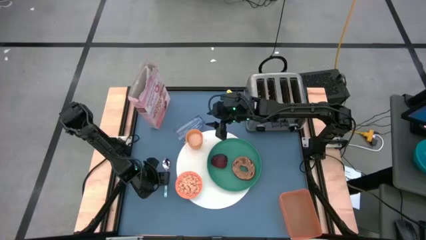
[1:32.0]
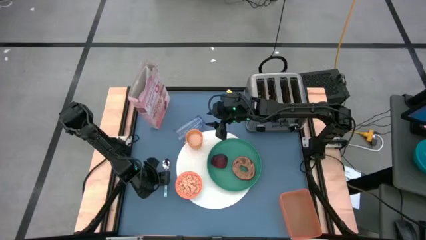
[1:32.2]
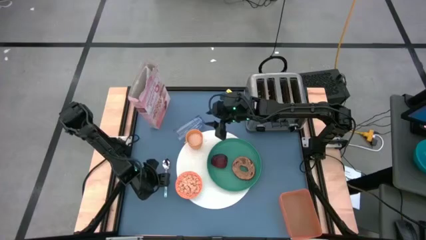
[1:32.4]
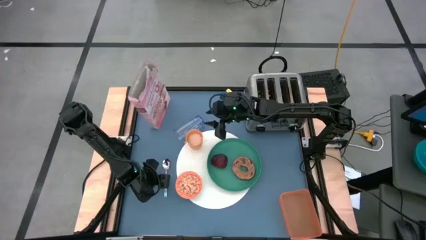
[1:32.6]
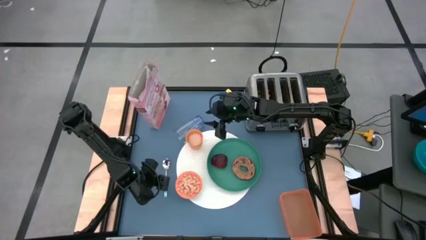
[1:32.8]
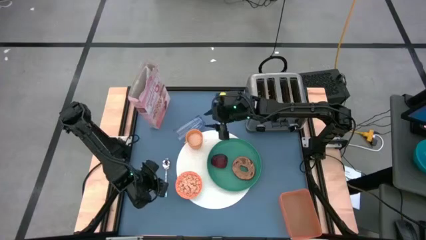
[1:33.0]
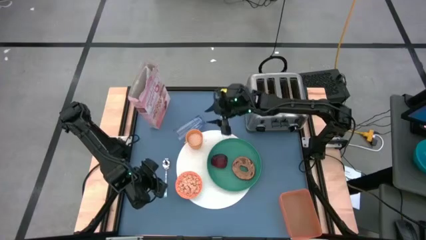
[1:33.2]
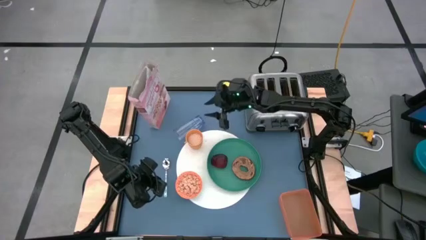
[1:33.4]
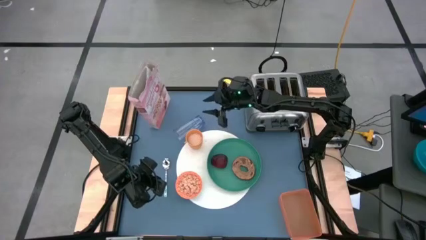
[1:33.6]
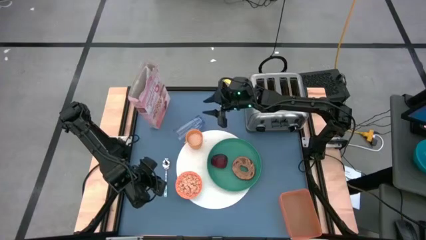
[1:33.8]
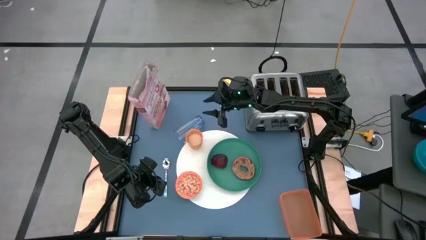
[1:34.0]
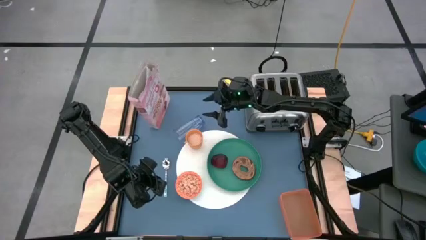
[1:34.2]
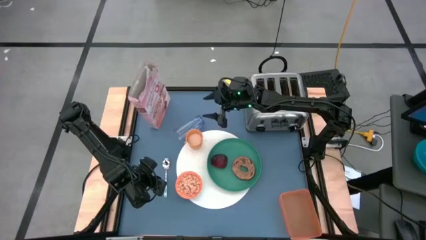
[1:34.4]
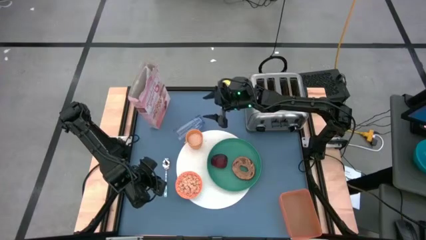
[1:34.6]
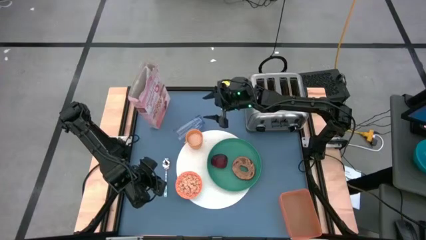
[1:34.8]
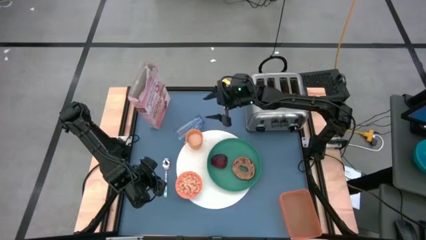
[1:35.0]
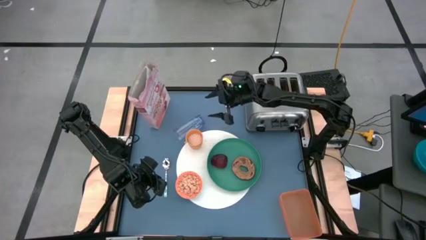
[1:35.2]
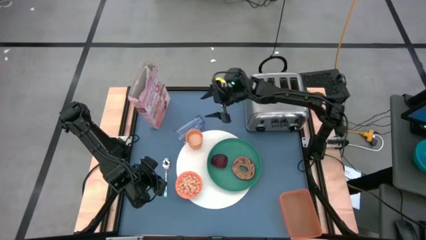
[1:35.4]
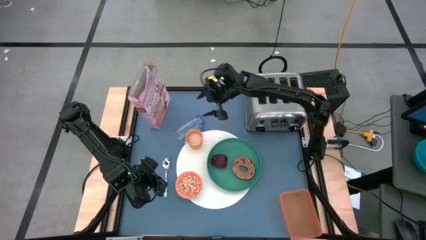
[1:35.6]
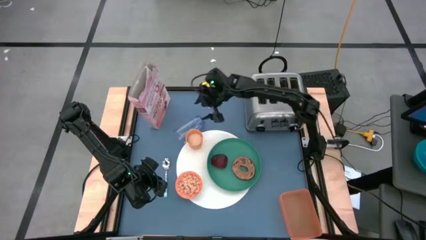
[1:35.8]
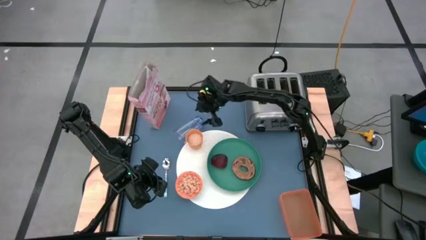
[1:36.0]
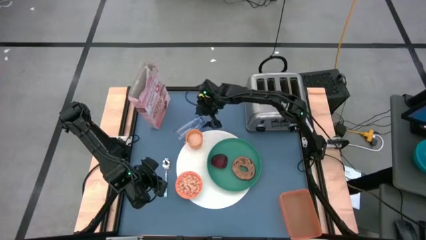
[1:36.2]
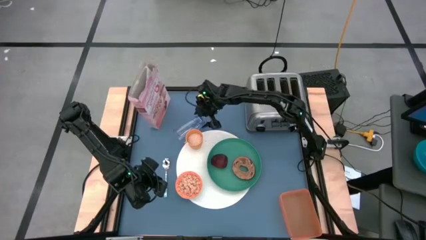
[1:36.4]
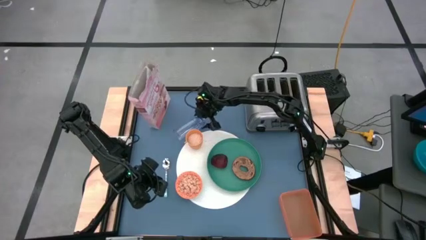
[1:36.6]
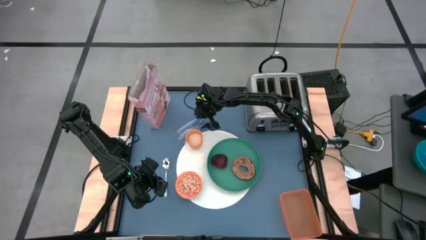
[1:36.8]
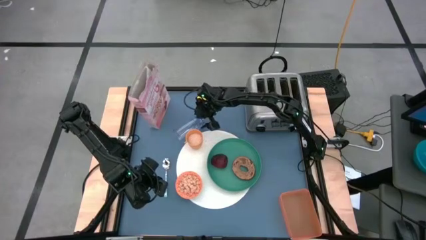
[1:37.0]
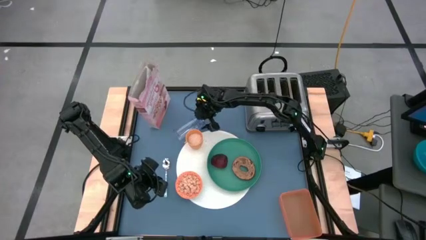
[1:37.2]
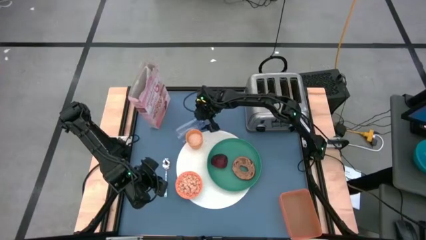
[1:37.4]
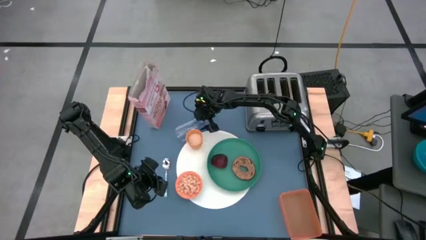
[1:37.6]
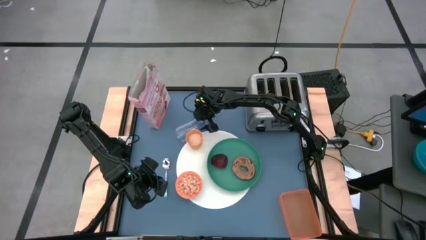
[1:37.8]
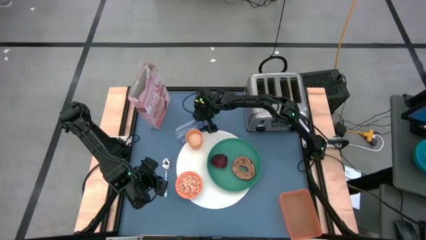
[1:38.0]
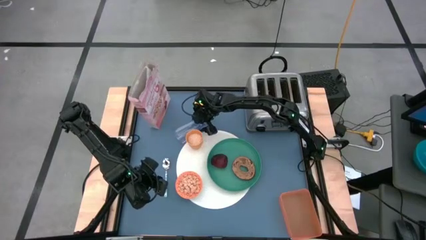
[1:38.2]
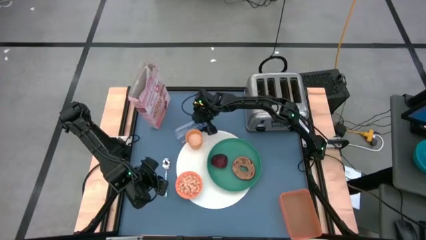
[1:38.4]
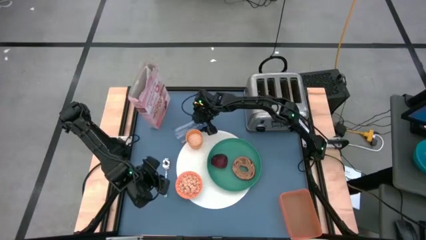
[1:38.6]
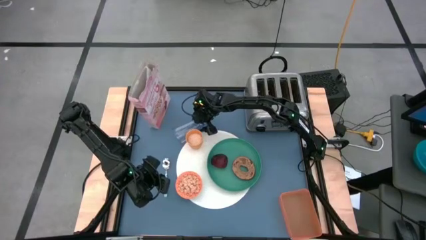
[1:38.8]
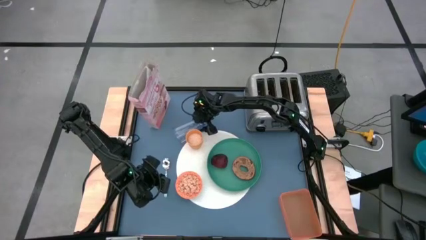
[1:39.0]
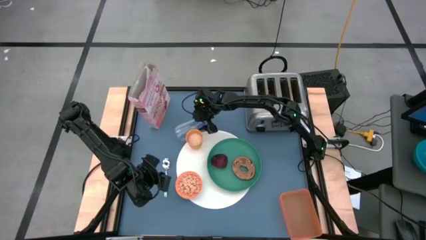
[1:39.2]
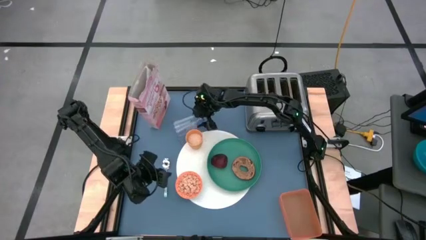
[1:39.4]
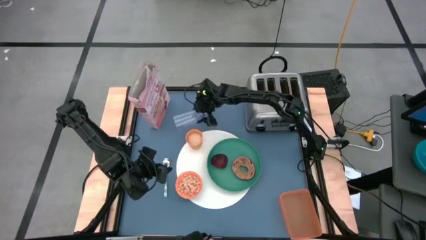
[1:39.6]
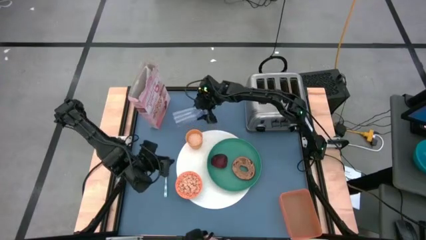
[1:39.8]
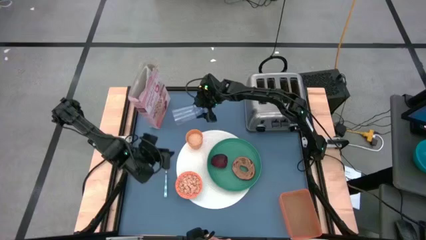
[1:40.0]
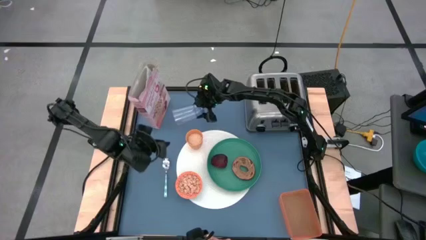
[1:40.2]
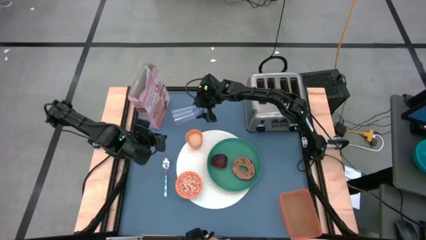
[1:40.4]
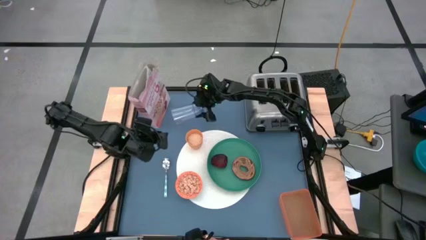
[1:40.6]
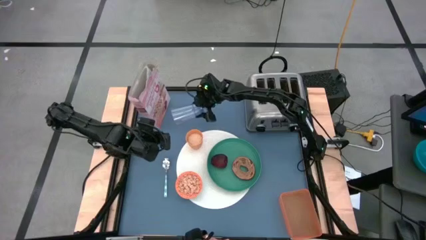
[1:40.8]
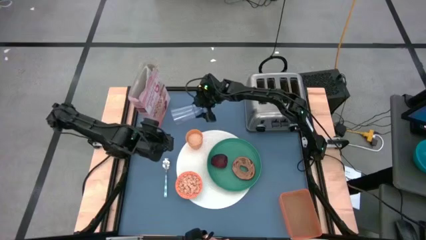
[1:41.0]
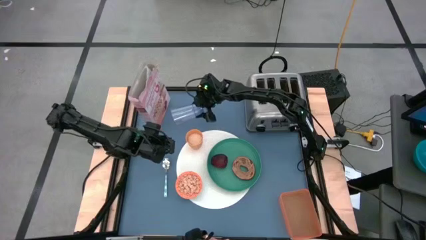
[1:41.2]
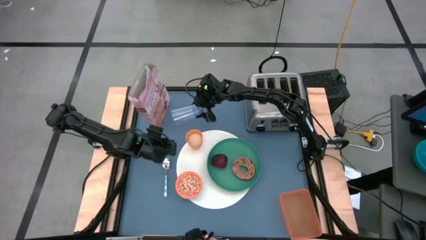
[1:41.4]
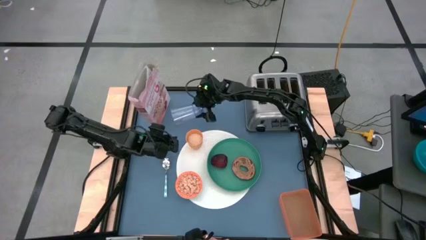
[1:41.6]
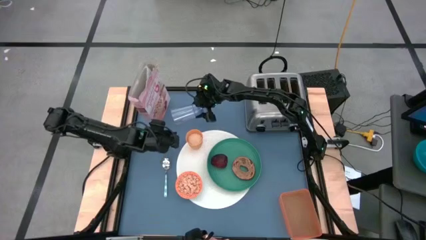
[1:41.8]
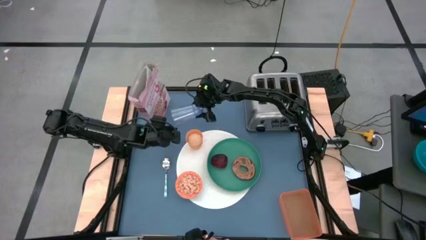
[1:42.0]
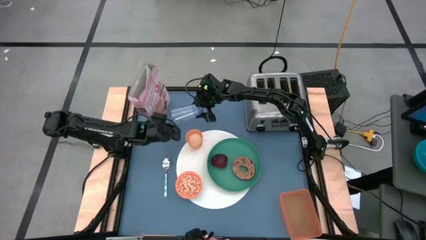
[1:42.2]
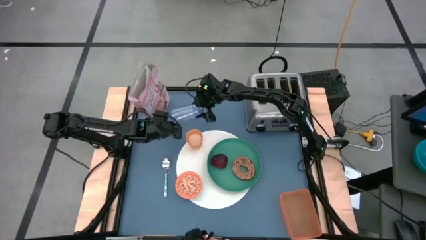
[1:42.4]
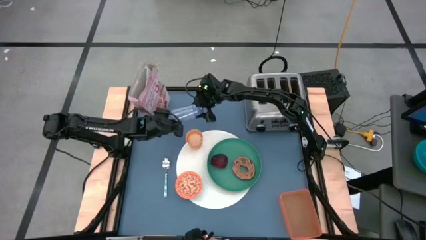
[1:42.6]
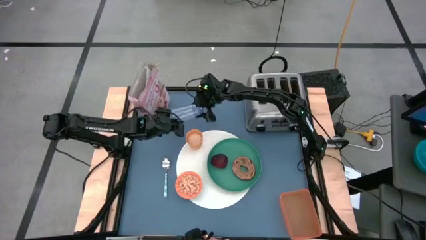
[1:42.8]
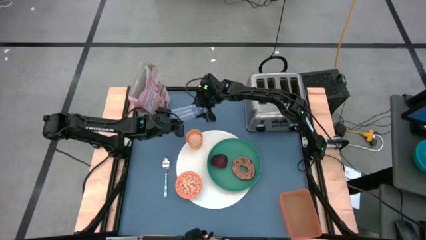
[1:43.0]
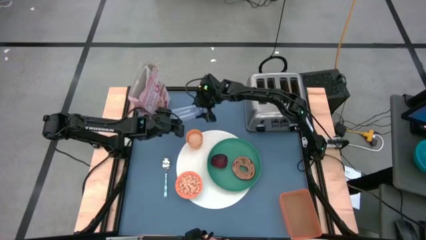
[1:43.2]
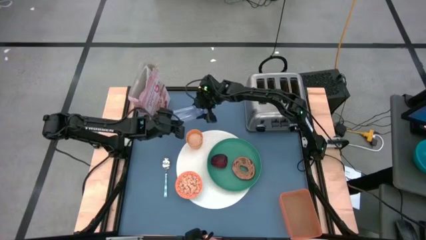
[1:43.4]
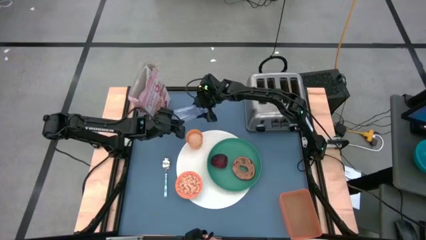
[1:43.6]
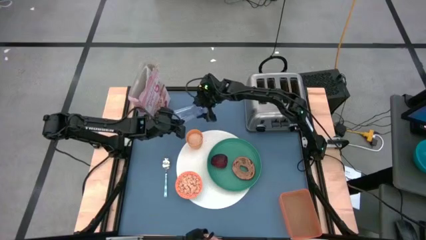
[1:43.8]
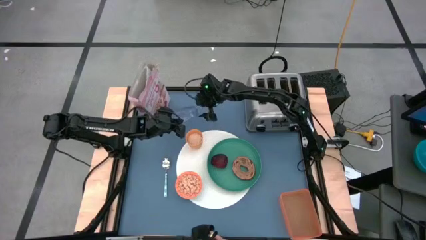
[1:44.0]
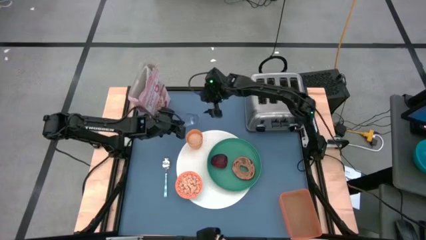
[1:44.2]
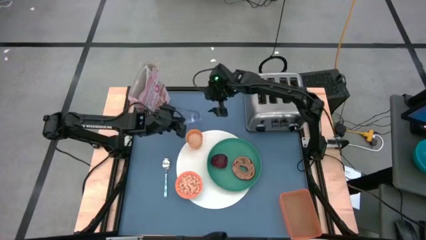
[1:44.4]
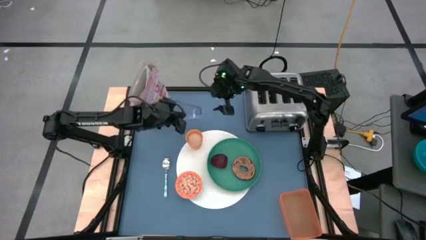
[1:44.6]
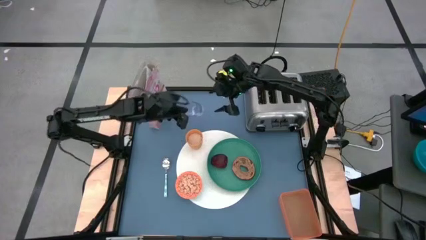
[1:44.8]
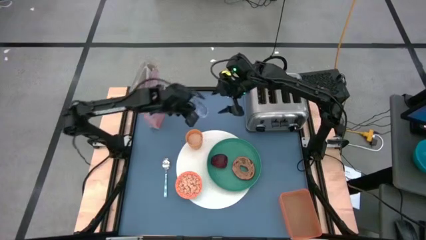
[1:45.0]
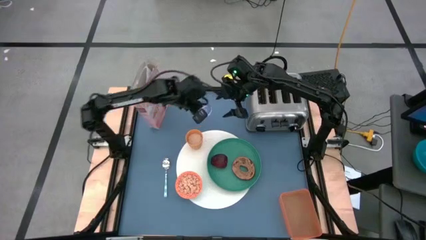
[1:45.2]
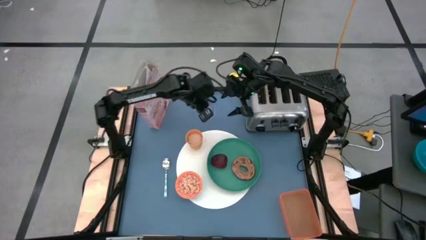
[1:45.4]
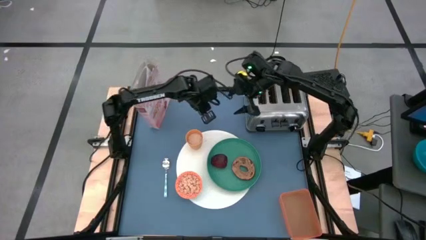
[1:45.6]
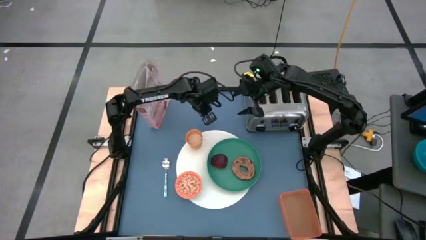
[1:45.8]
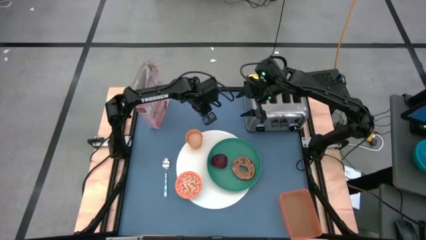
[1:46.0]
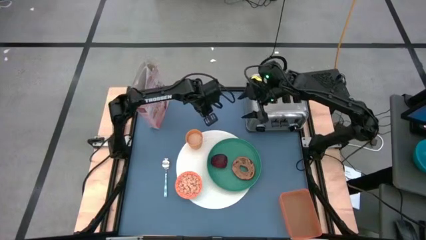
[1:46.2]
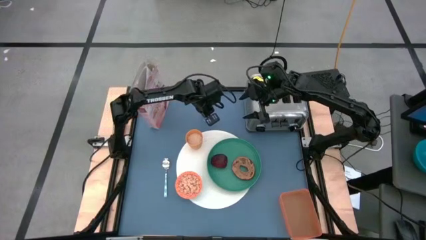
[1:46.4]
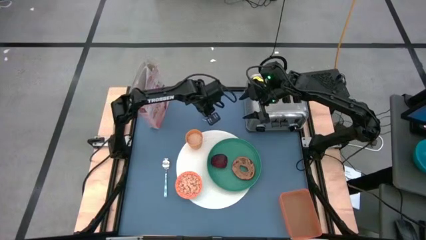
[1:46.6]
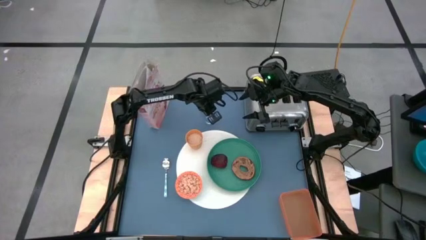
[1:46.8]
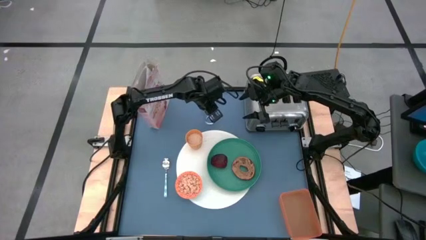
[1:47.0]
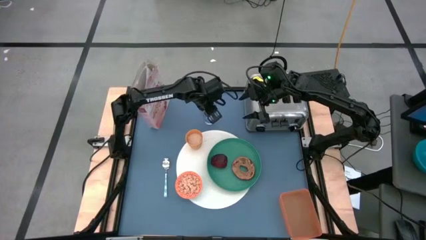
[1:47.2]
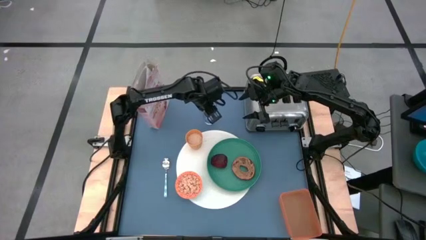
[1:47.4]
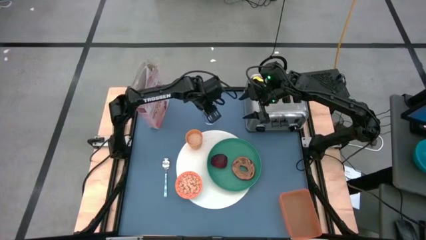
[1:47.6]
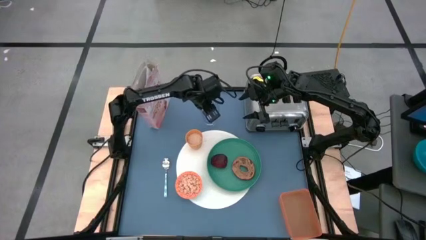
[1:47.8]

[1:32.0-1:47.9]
Task: Arrange a breakfast setting
Put the cup on the top of the white table mat
